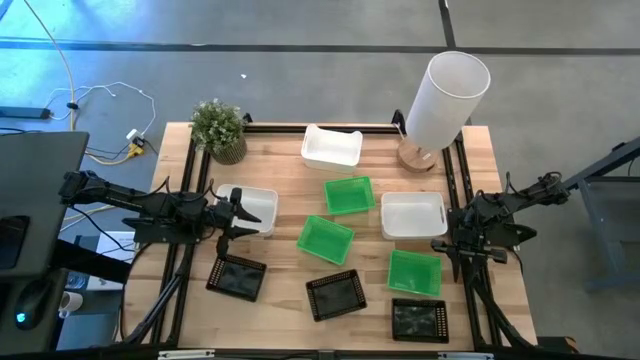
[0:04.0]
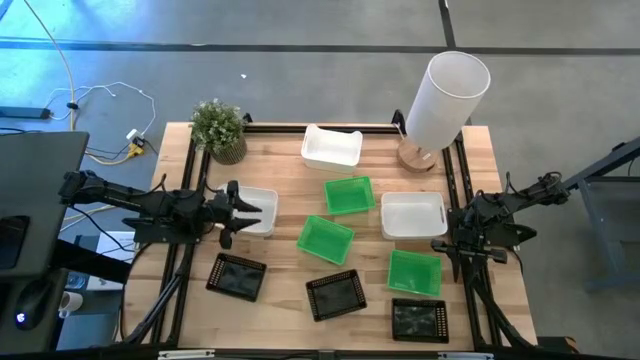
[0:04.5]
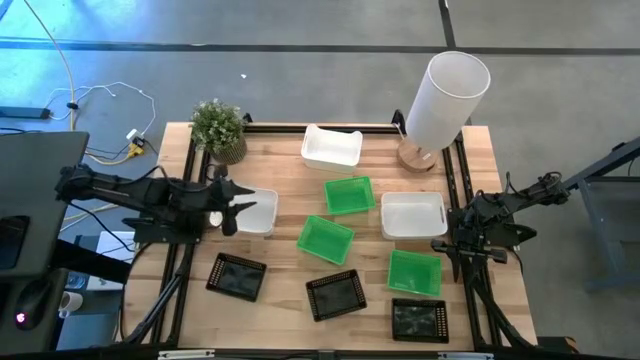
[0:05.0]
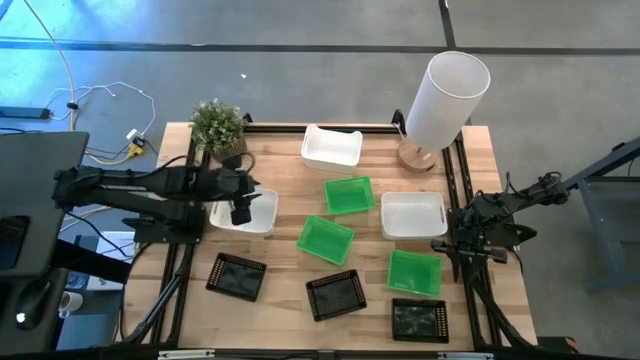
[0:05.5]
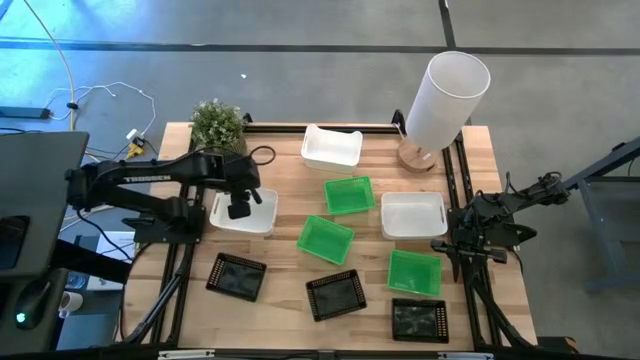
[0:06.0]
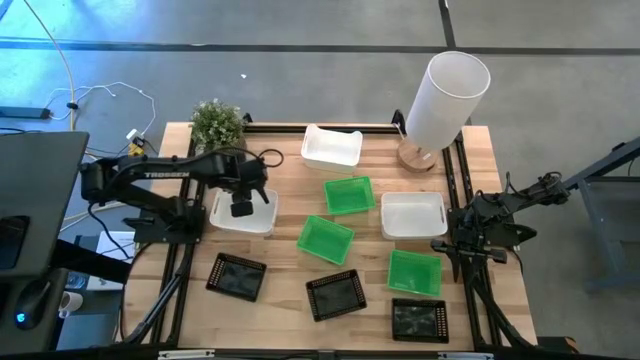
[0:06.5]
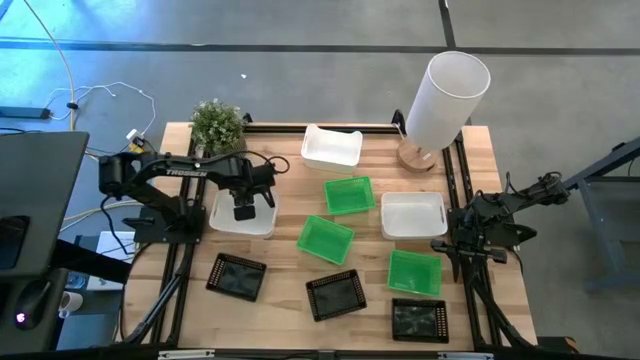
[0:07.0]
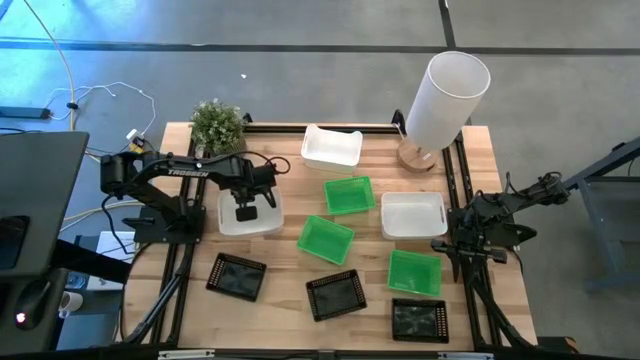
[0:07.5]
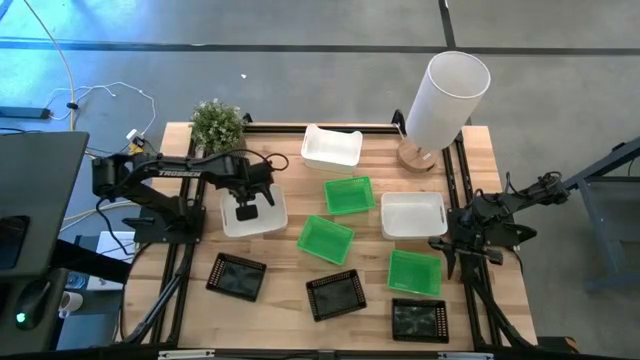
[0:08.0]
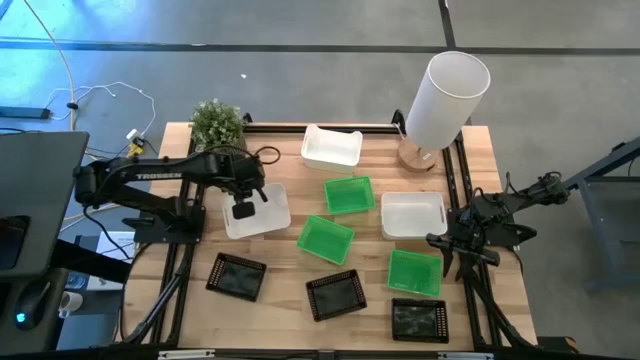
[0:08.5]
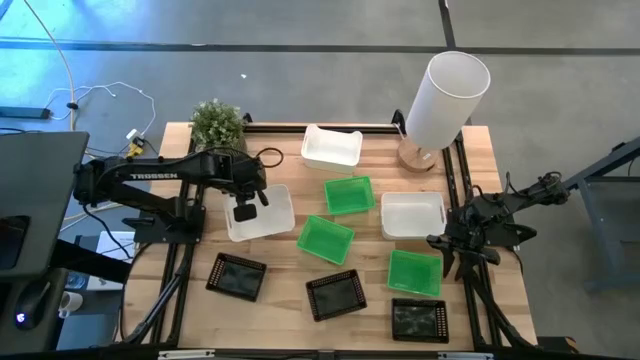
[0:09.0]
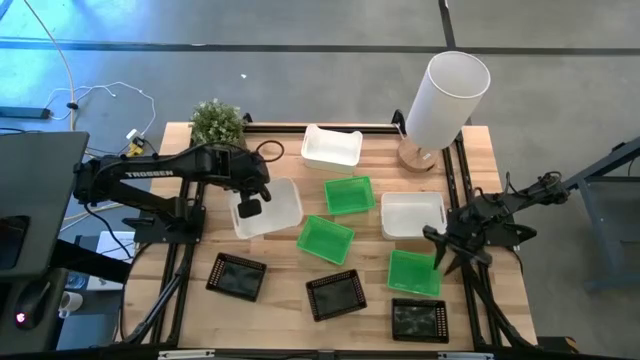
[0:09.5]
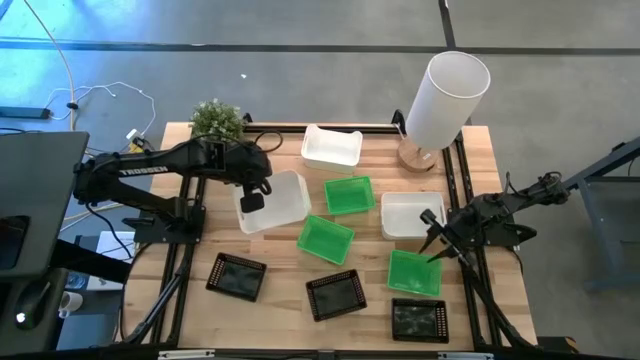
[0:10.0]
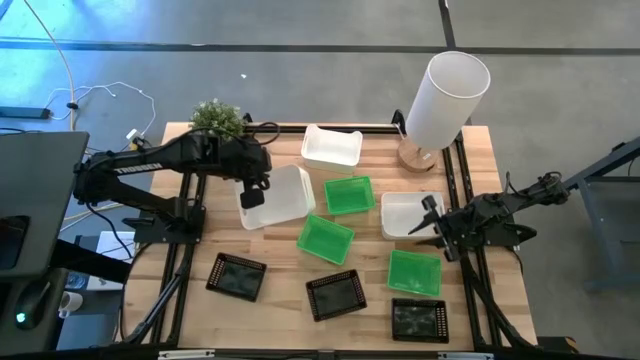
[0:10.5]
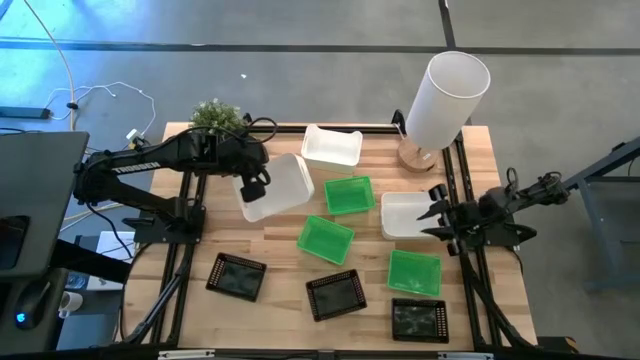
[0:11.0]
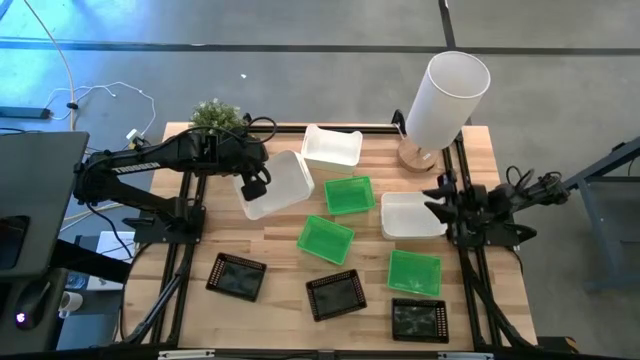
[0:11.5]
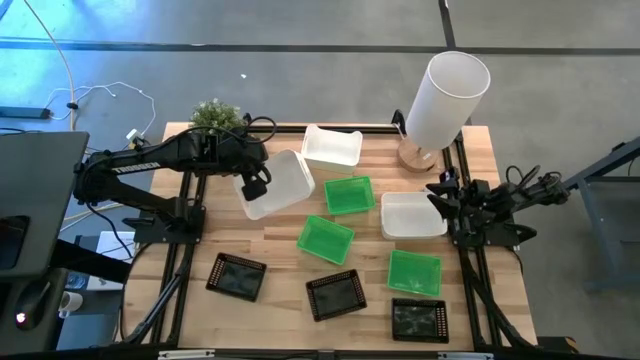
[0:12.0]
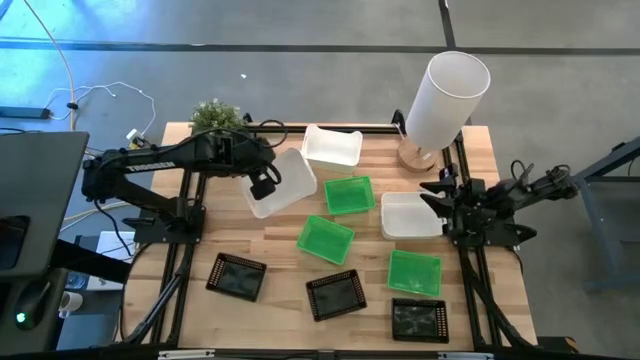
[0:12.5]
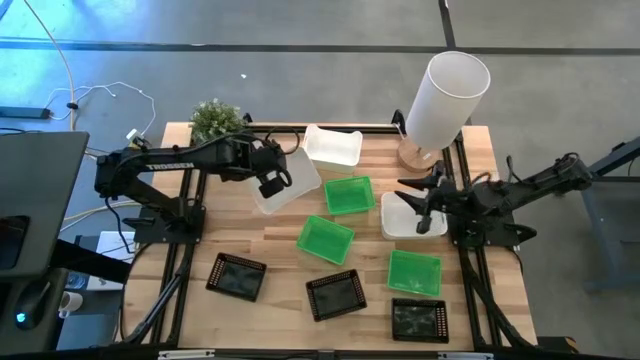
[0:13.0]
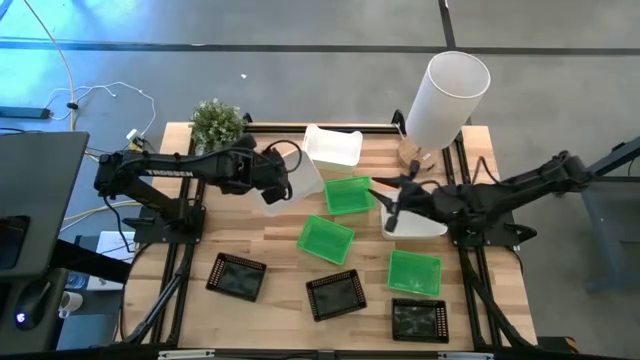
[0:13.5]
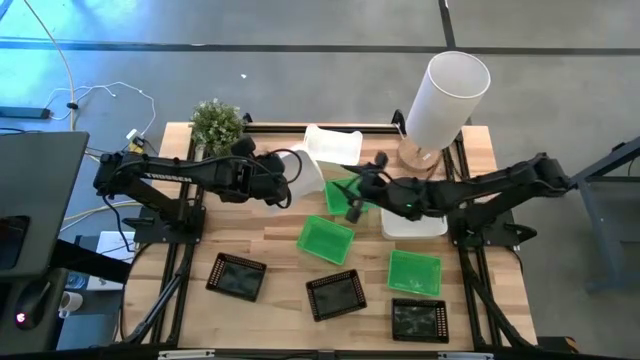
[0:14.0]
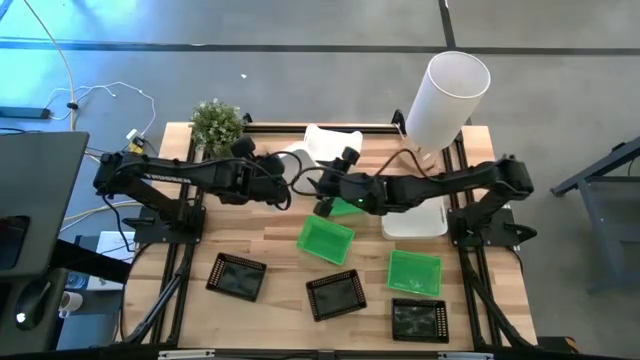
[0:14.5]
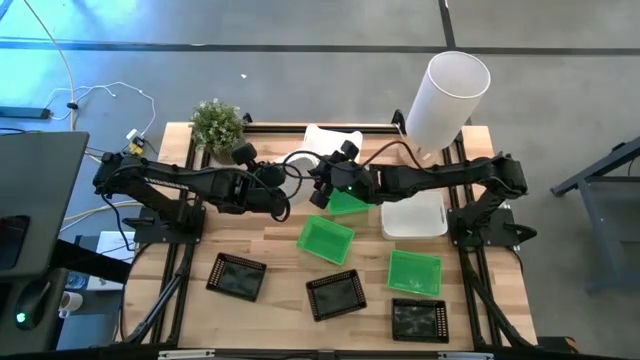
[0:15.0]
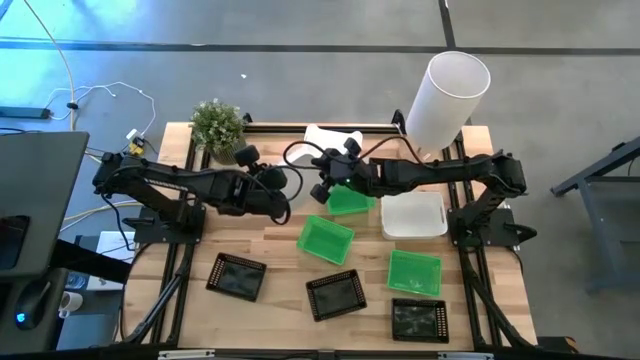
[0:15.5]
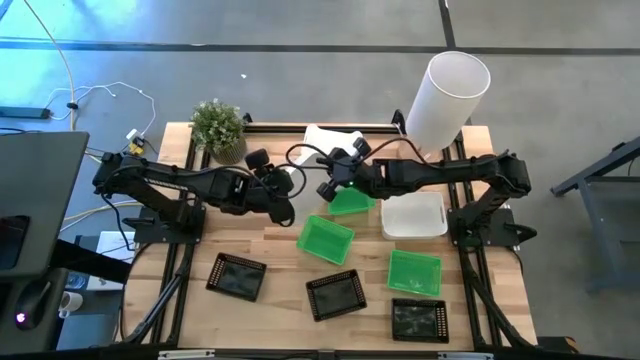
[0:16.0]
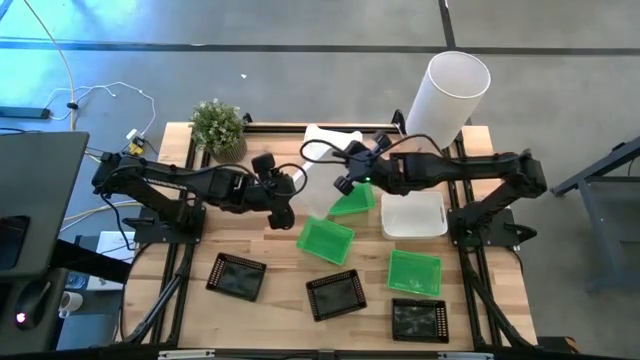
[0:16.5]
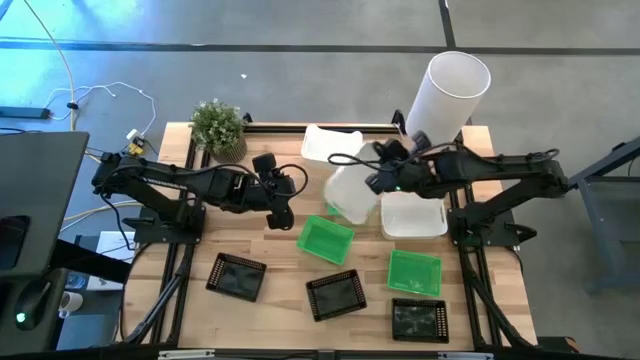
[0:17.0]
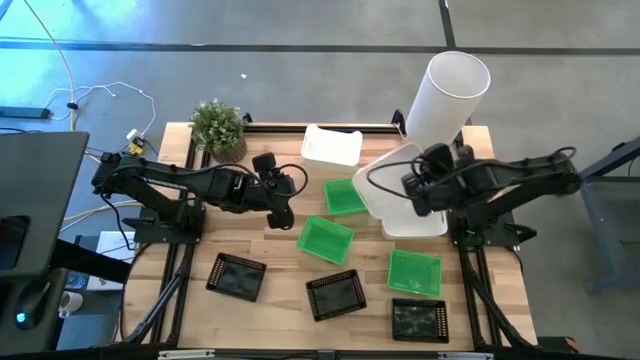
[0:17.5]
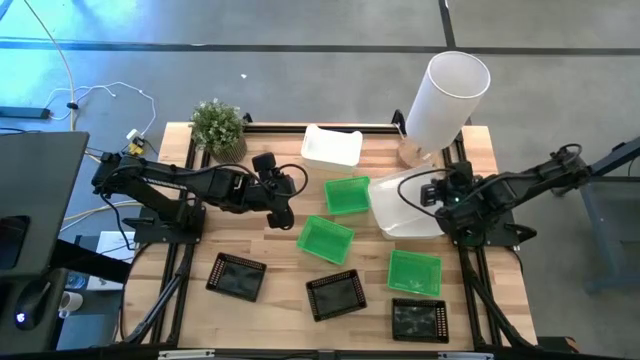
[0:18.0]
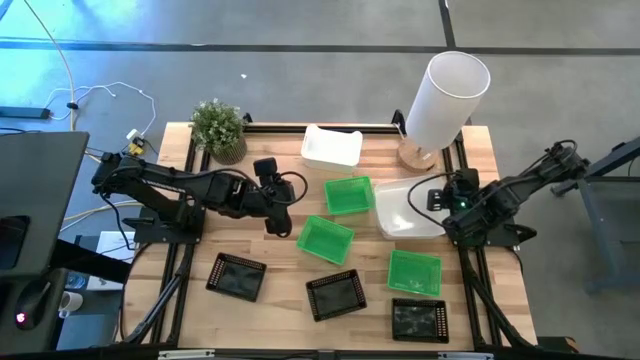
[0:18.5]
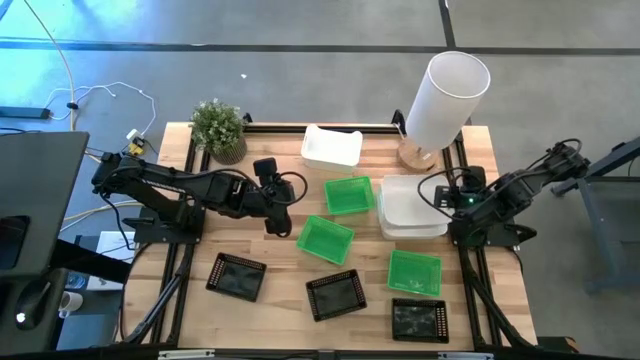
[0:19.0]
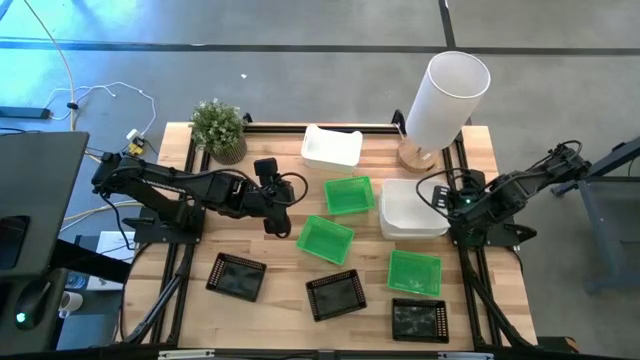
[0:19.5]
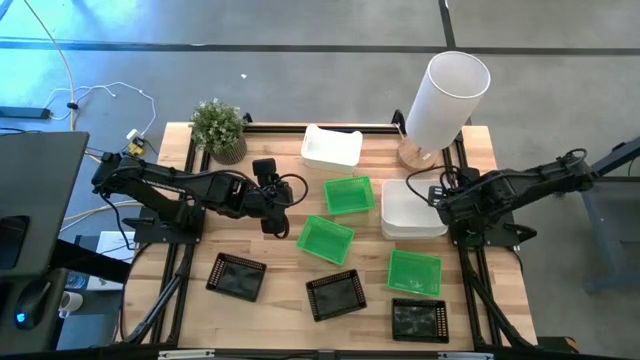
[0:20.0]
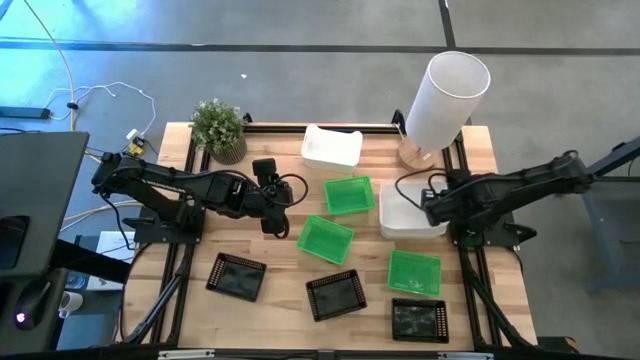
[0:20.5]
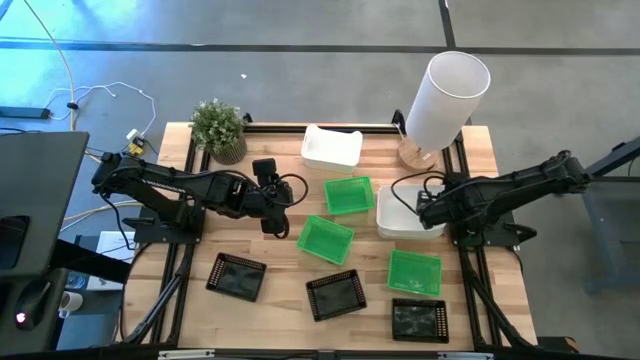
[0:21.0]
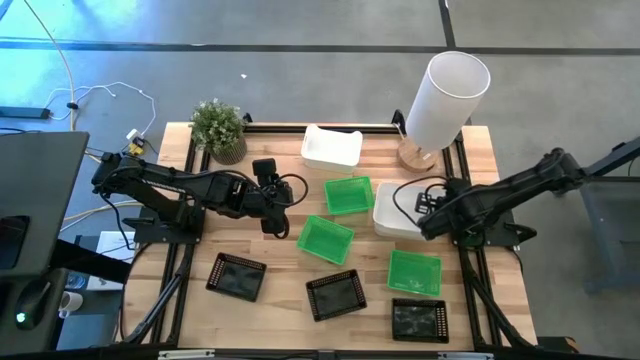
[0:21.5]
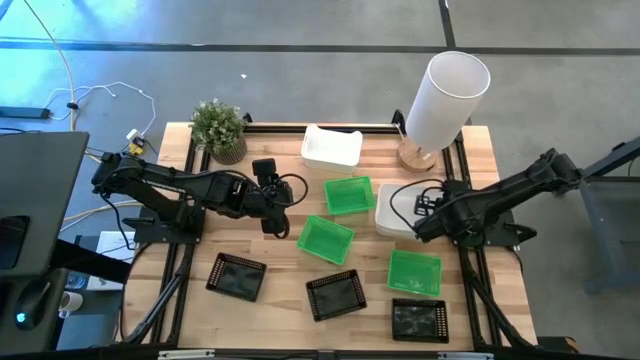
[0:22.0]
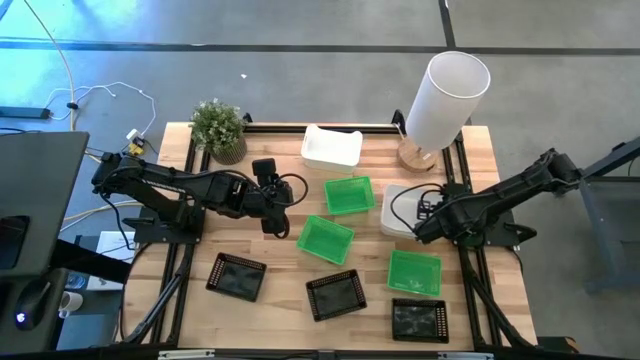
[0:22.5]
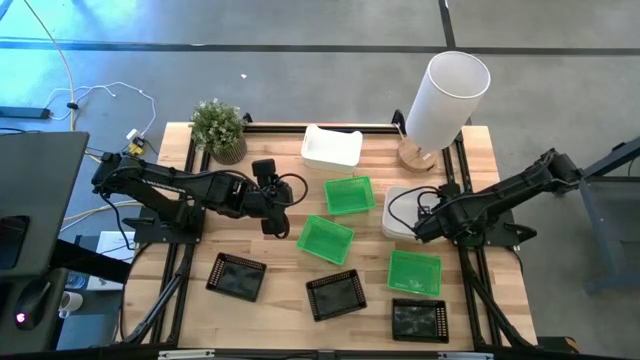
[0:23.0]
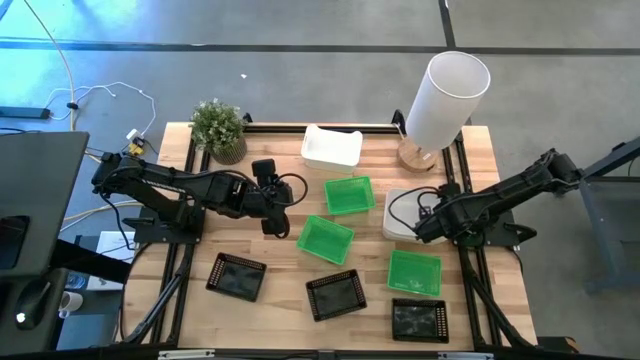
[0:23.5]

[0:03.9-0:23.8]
Stack the bottom left white bin on the bottom right white bin
